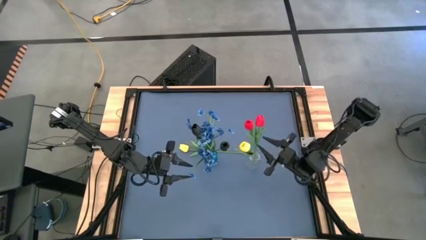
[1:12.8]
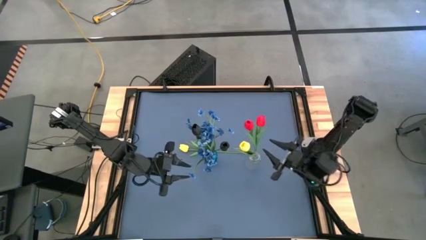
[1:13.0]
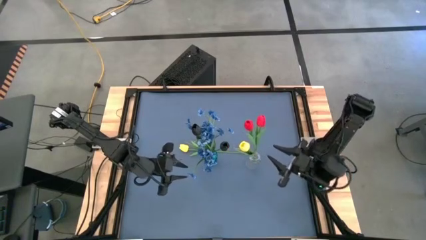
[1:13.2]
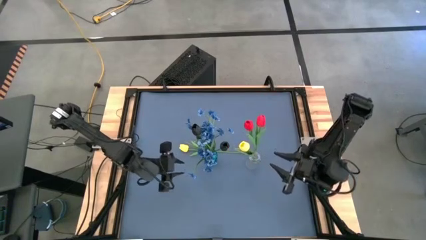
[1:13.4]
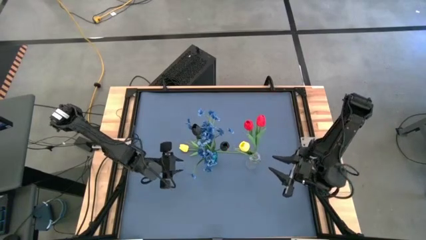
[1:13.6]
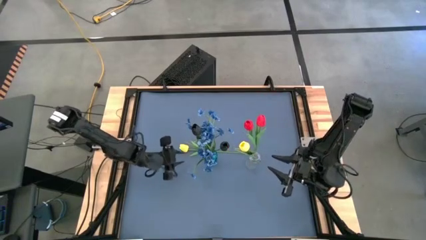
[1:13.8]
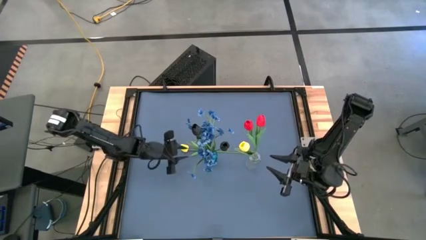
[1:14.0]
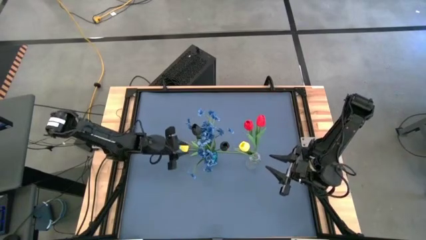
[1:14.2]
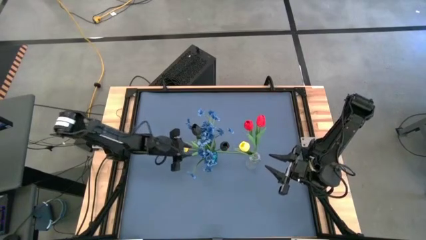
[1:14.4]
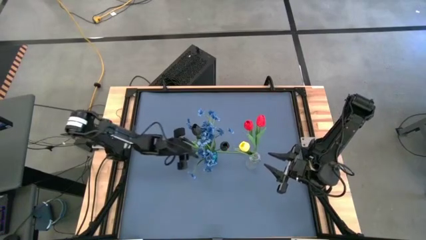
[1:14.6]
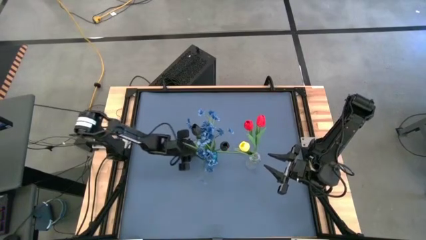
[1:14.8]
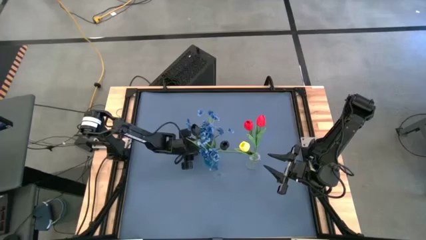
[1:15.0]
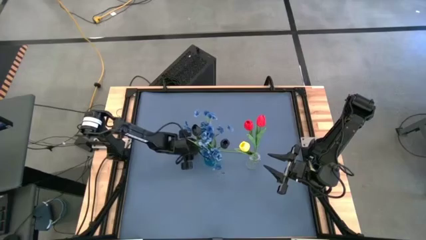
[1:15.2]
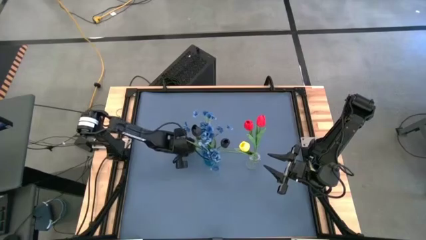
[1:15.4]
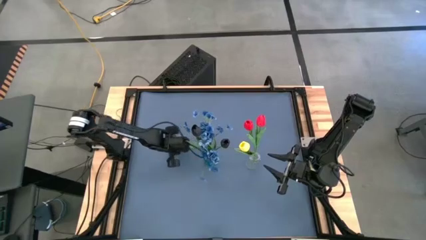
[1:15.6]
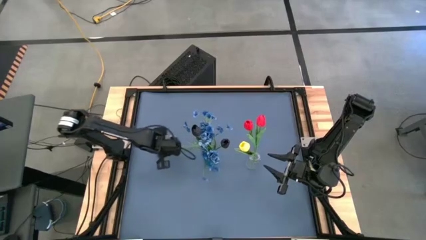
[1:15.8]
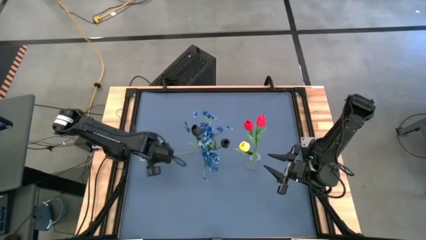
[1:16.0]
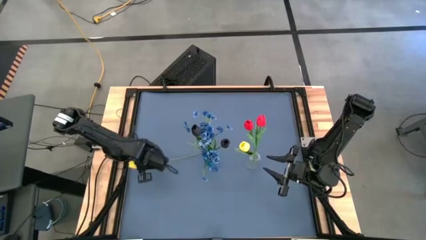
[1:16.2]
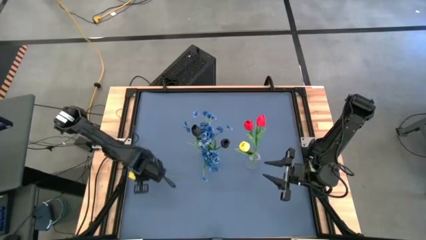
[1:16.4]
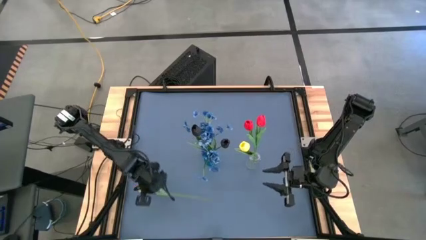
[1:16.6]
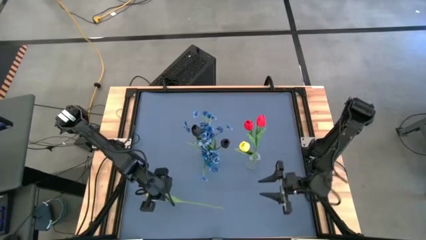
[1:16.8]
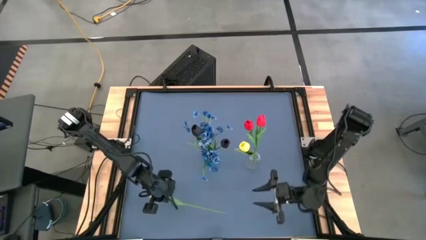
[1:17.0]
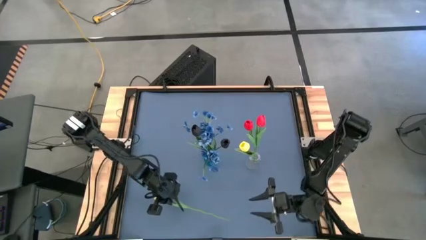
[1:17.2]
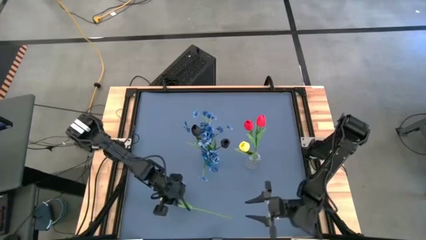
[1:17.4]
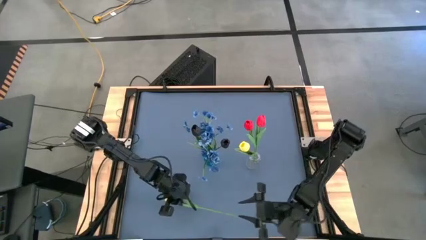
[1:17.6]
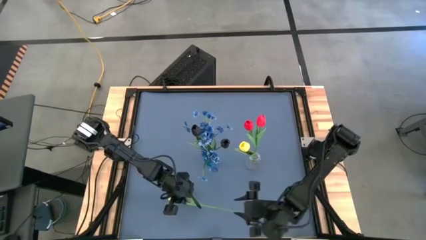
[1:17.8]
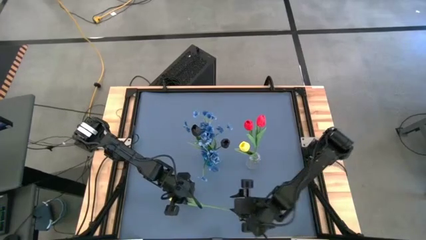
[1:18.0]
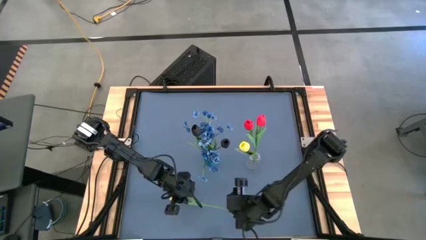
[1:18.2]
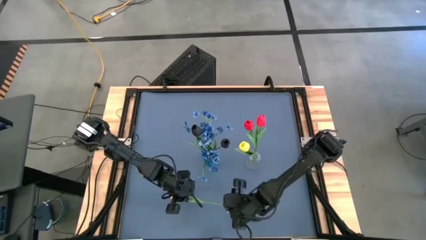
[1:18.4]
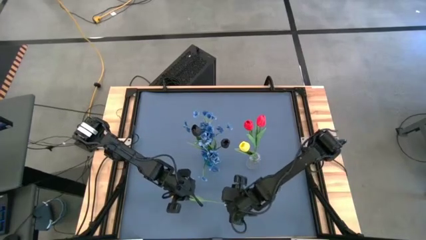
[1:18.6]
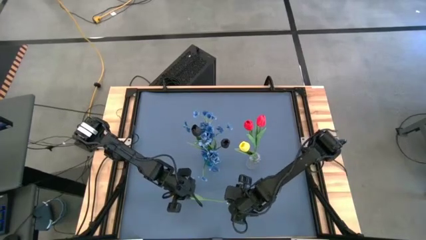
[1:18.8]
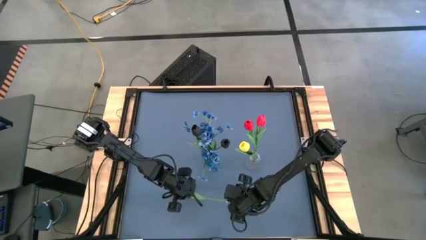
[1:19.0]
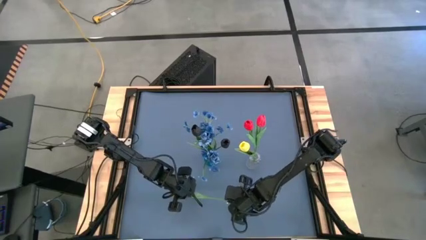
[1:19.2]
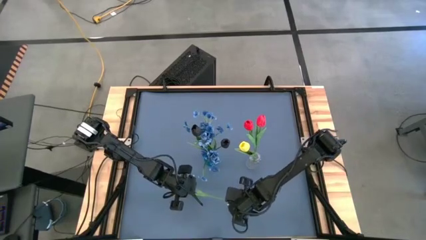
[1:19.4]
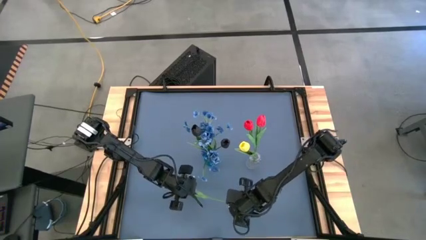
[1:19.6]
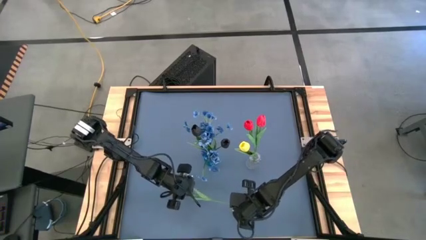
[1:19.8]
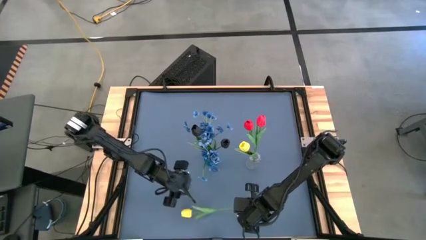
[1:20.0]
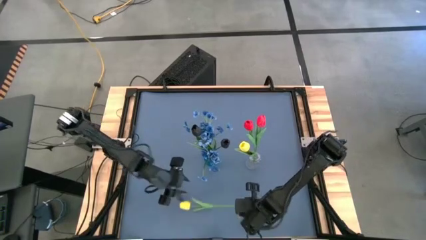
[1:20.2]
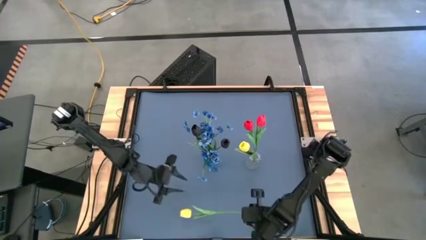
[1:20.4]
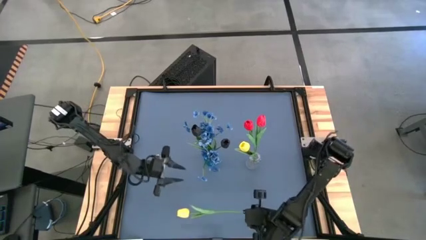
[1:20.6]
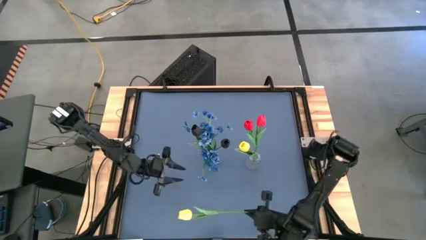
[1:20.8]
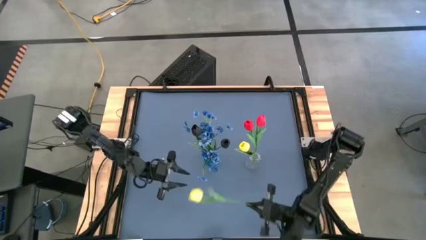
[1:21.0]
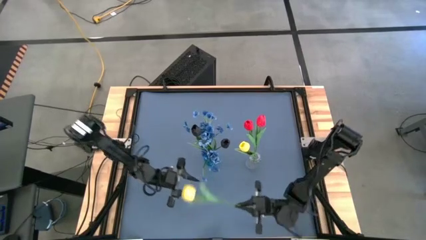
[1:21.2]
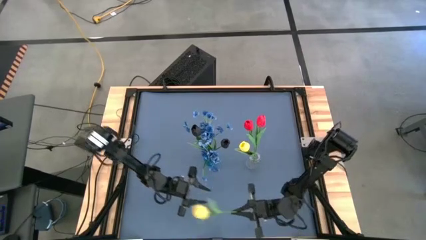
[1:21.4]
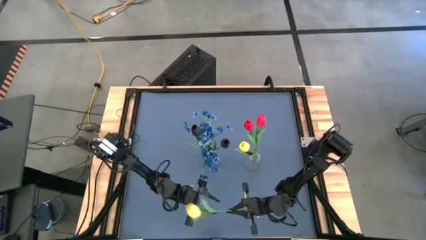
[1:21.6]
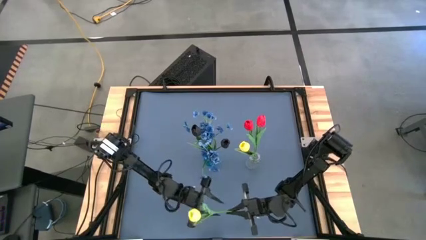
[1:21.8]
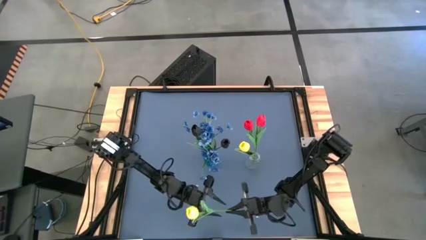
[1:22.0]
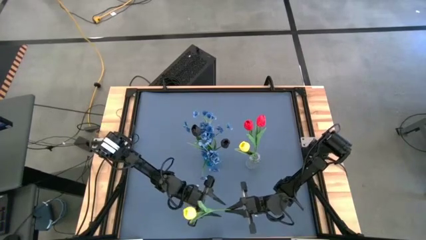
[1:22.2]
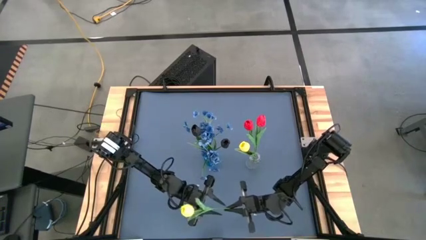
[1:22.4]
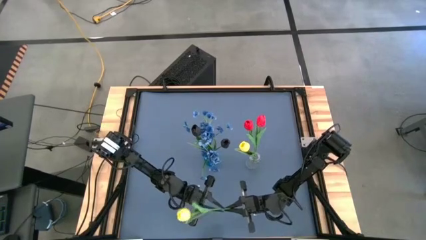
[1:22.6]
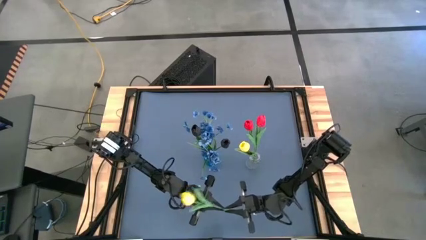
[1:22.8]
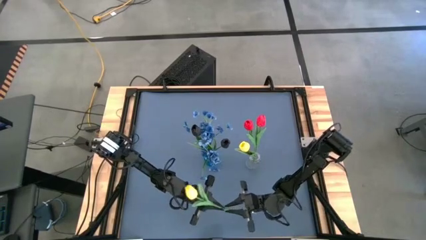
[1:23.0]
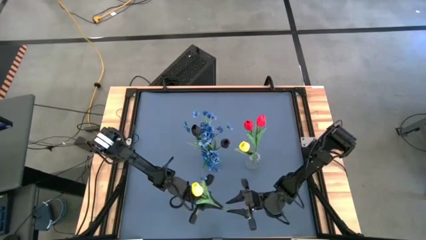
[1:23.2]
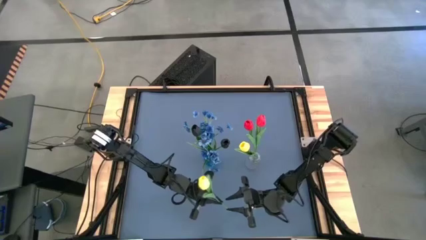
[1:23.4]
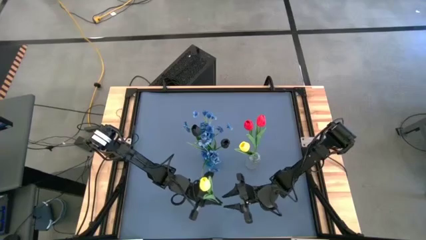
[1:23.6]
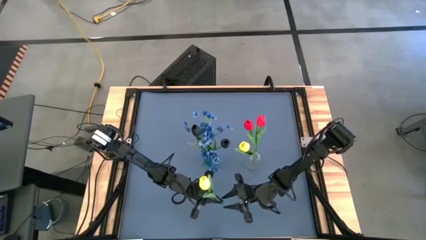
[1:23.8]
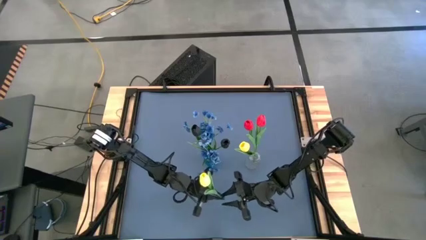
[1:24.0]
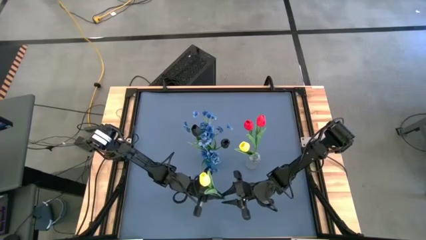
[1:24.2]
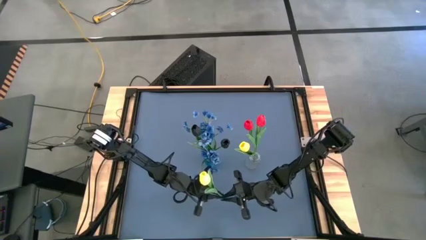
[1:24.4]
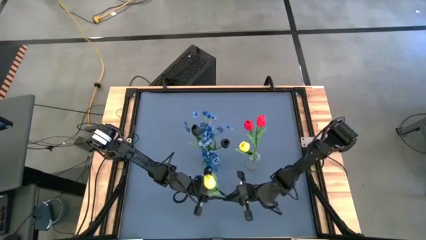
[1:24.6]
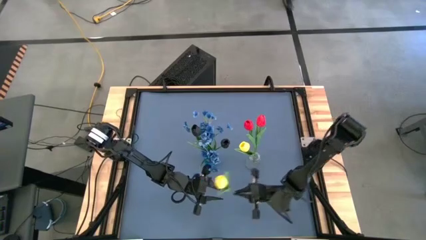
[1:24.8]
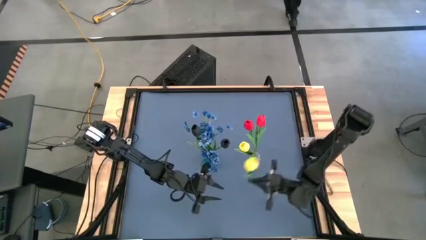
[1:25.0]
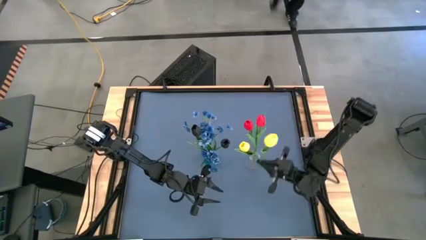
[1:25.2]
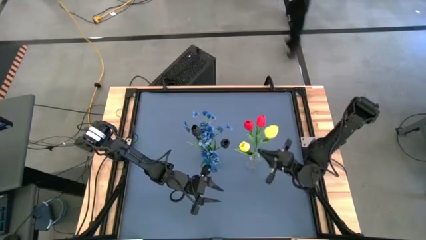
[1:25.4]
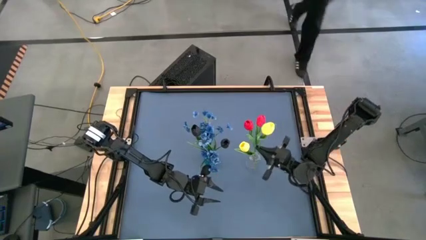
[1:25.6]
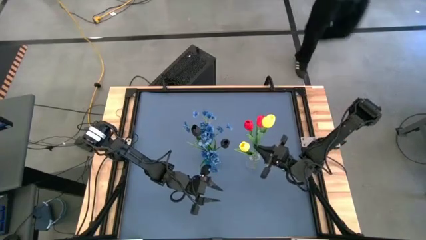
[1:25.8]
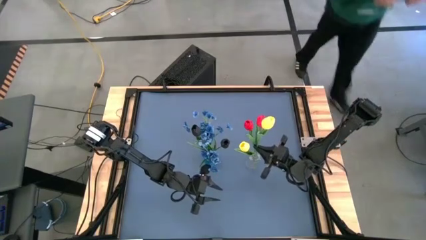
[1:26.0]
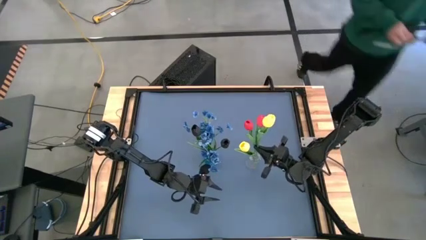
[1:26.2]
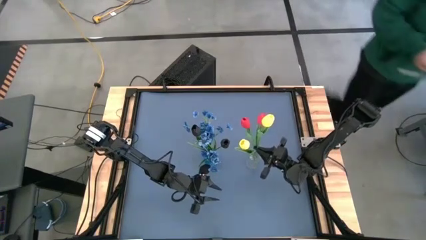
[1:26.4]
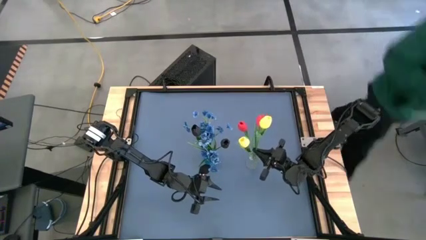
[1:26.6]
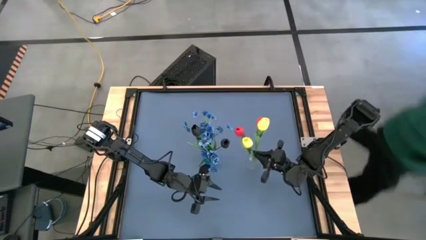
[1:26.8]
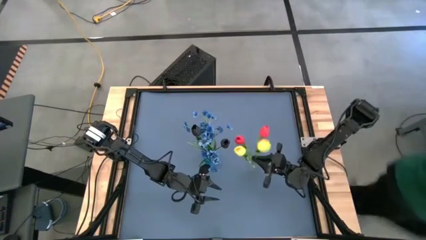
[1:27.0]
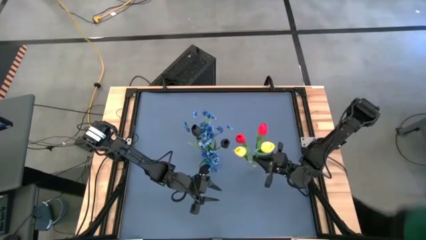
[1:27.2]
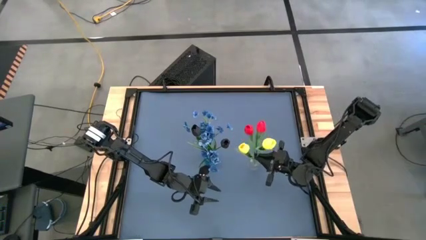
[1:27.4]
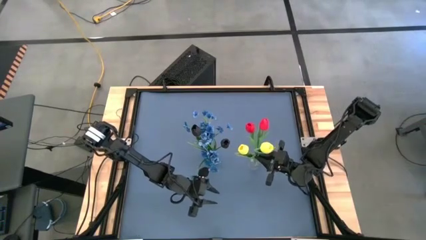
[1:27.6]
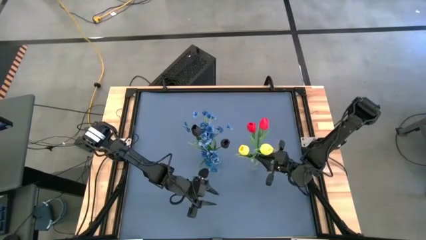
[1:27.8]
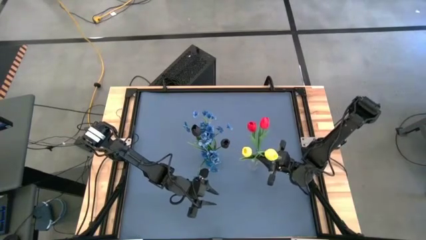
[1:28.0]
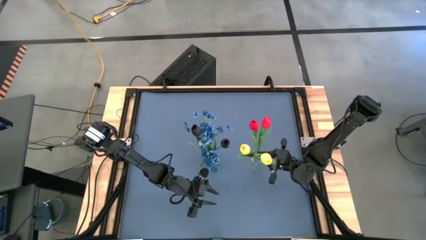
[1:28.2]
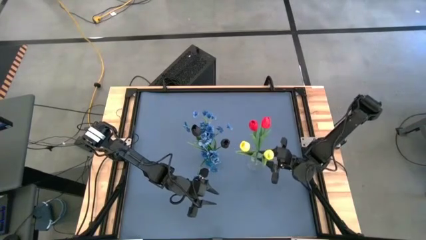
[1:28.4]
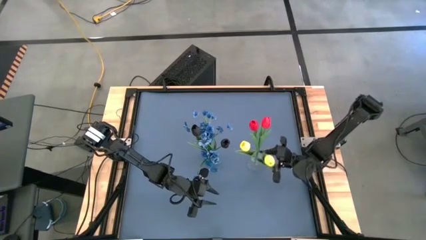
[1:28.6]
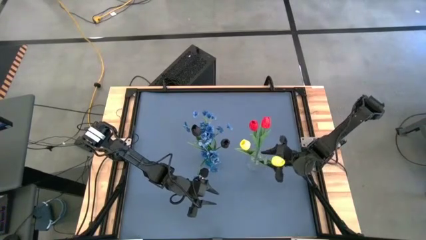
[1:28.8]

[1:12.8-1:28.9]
Task: Sort flowers into vase by color
Put the yellow flower into the transparent vase
